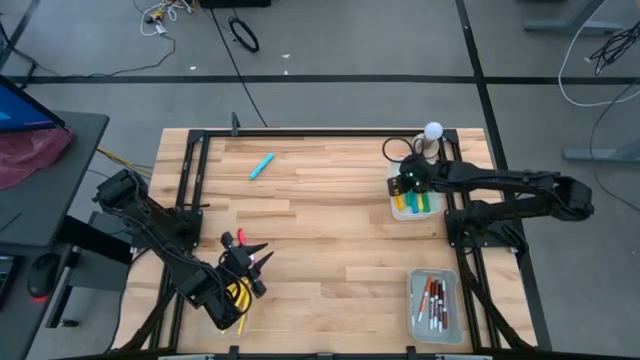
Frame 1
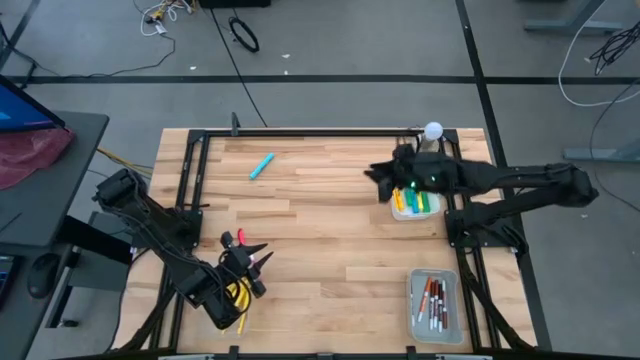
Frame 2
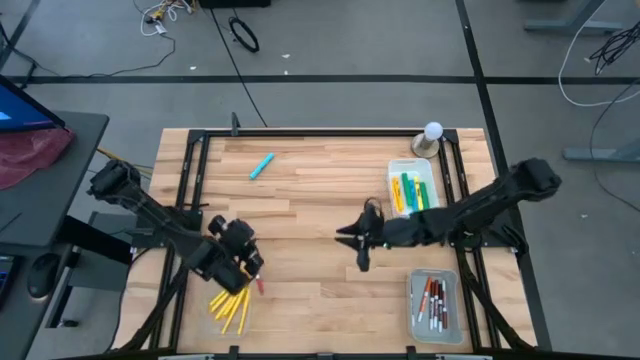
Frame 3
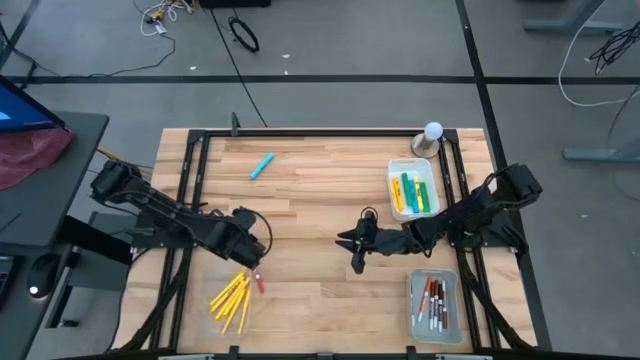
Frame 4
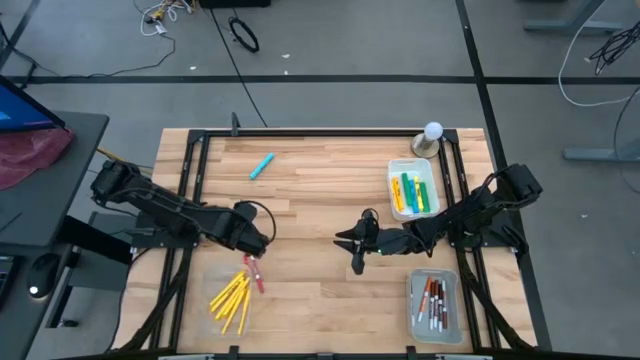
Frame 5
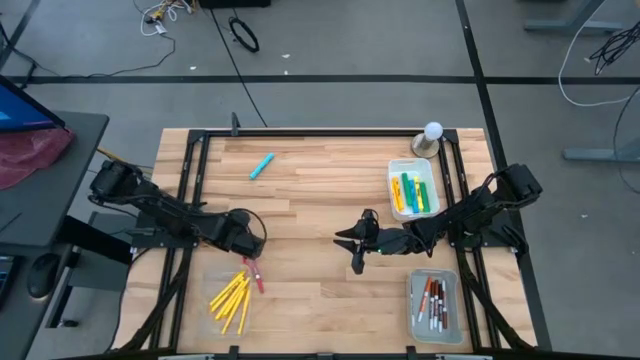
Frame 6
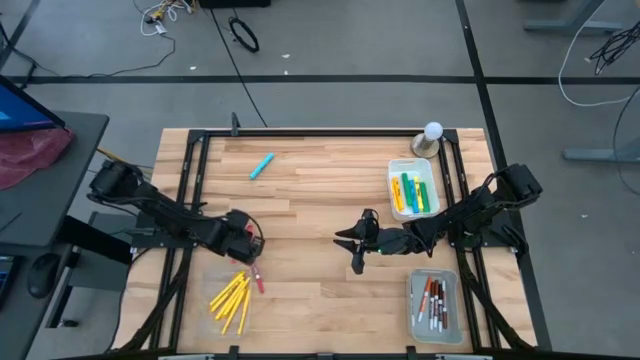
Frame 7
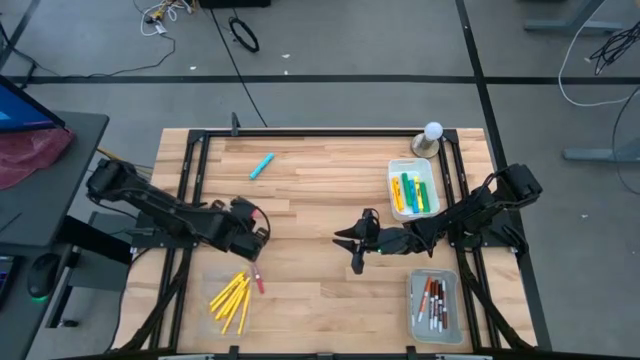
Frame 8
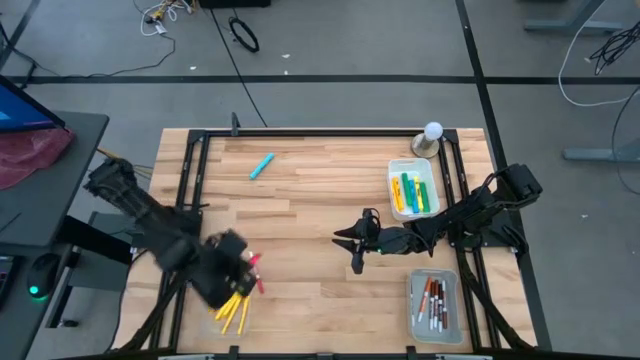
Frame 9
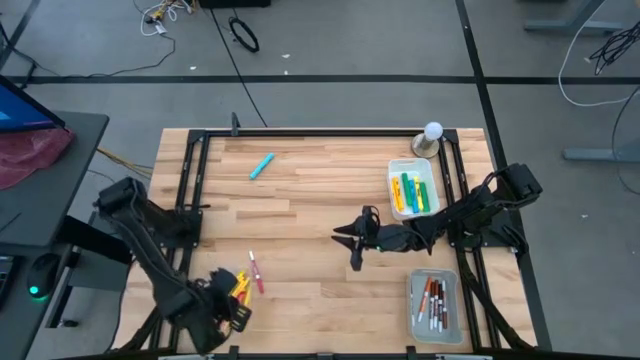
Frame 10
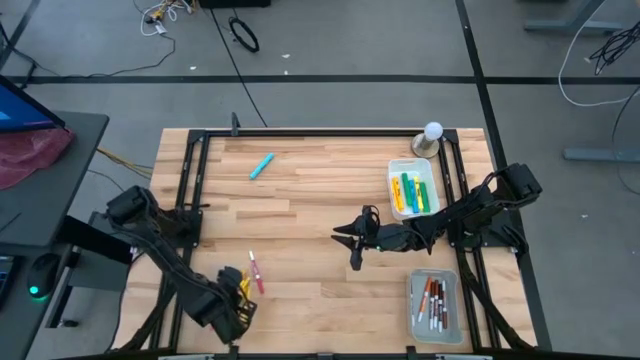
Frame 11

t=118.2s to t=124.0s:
Task: Pick & Place Markers
Put the pink pen into the transparent bin

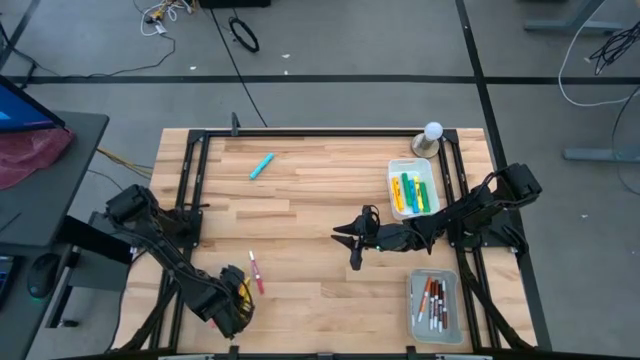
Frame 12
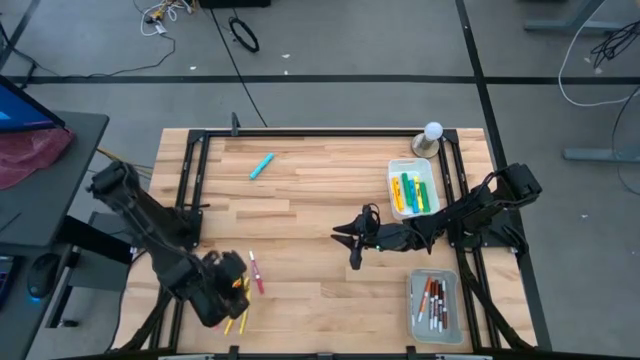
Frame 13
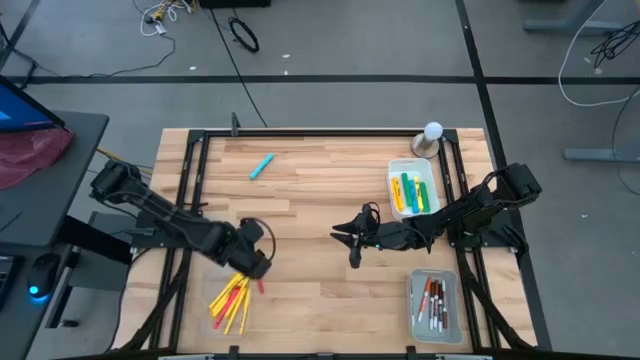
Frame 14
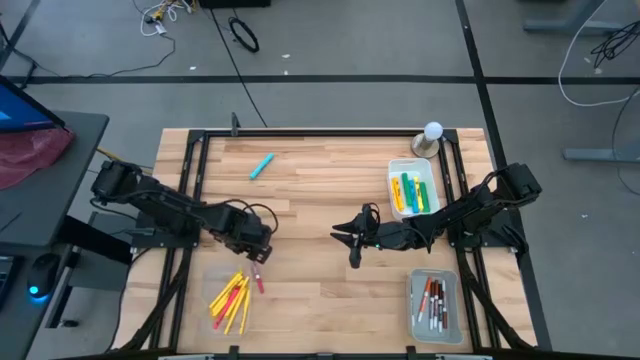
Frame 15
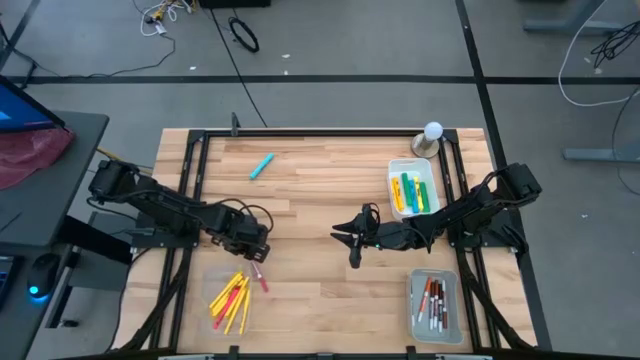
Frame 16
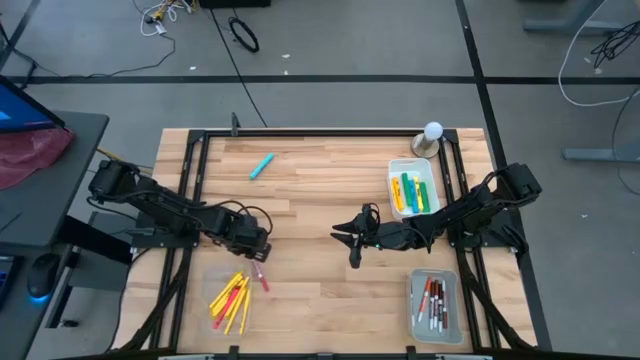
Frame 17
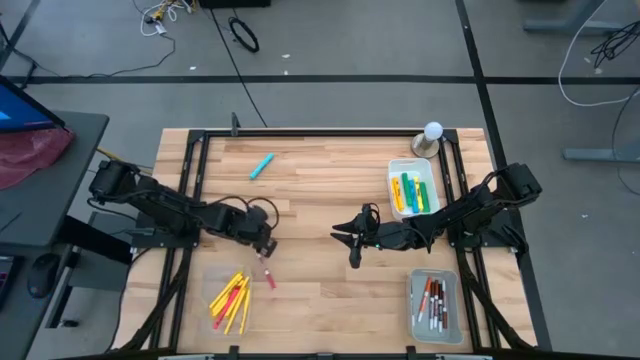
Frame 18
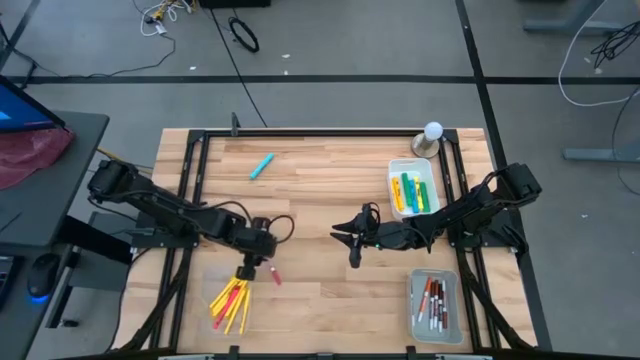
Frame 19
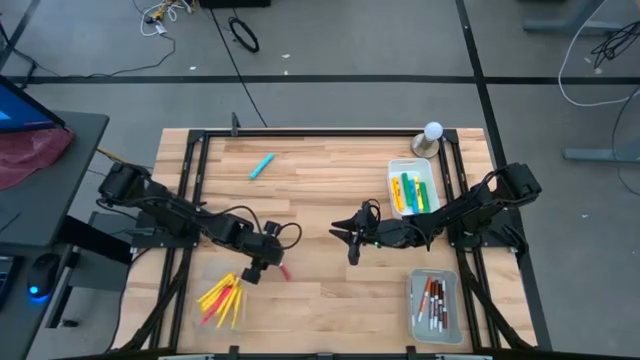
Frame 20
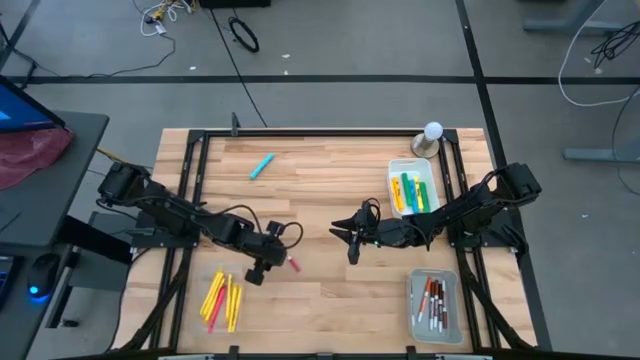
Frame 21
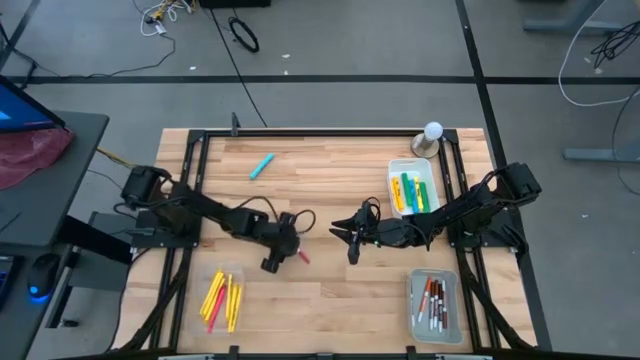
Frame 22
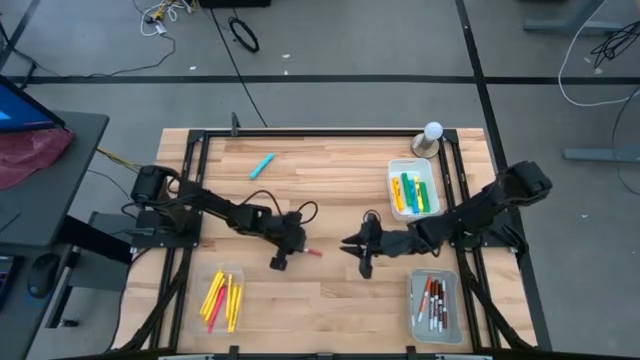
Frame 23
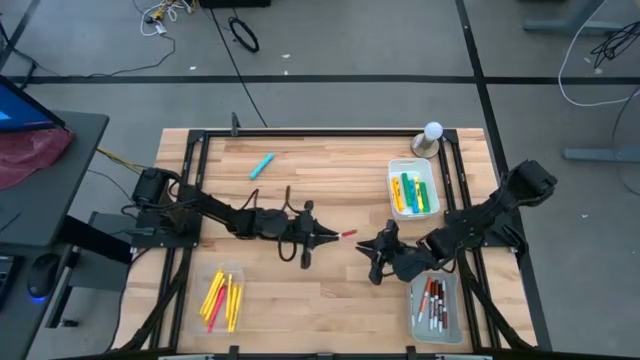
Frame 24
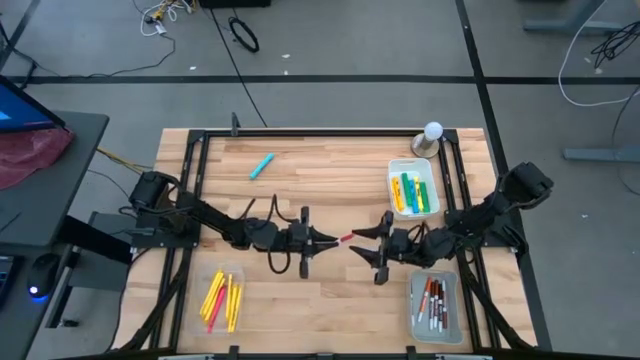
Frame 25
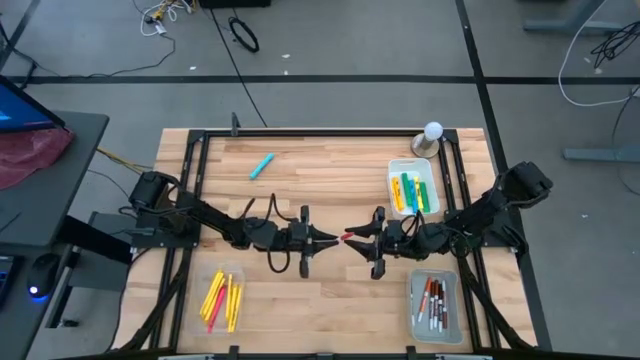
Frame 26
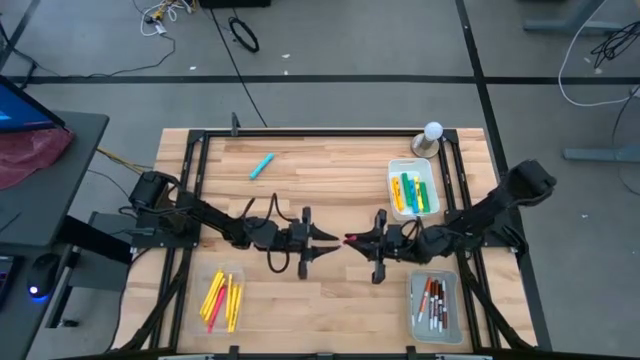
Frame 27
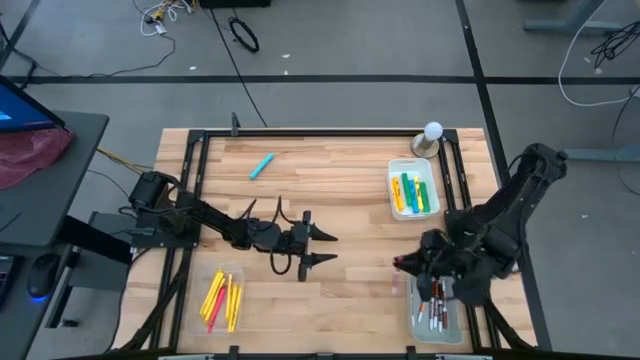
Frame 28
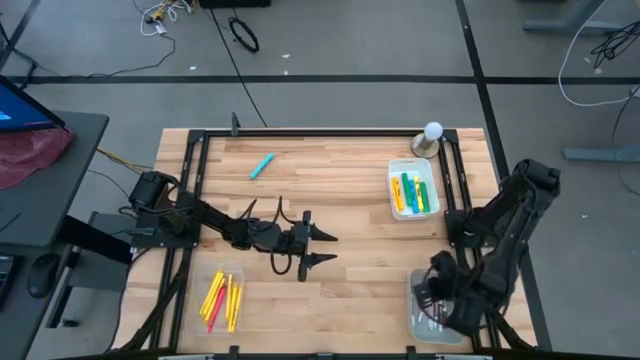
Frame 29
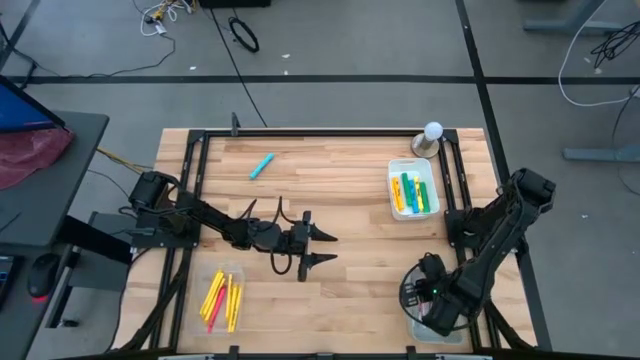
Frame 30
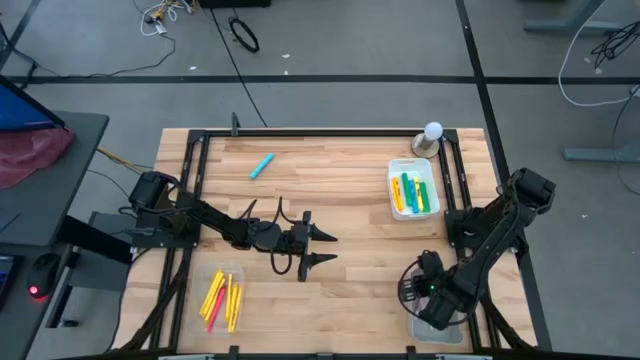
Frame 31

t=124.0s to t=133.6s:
Put the pink marker into the gray bin

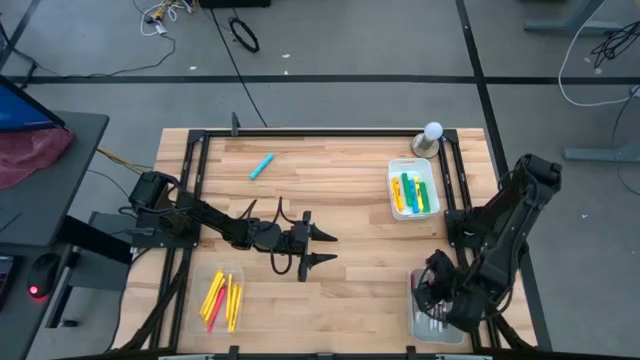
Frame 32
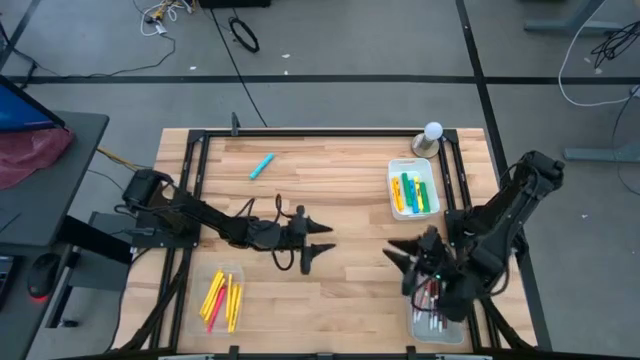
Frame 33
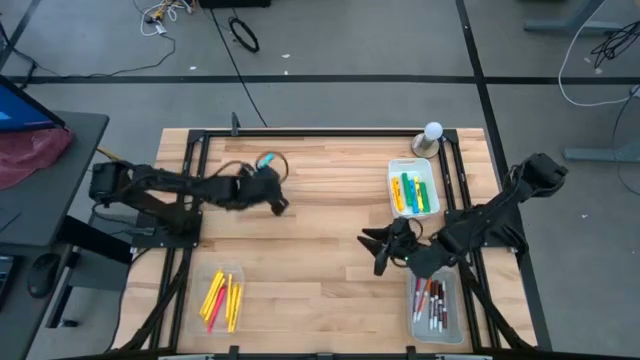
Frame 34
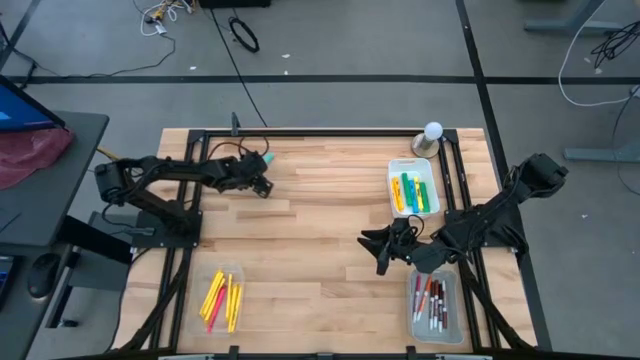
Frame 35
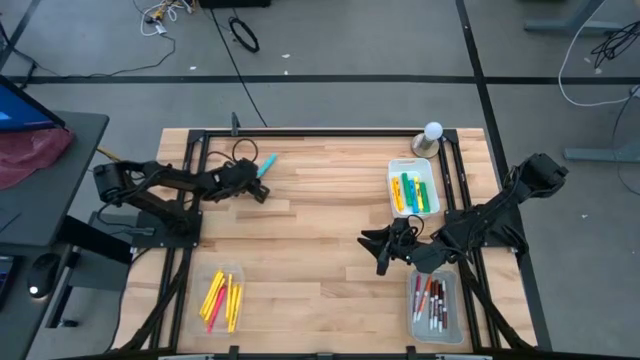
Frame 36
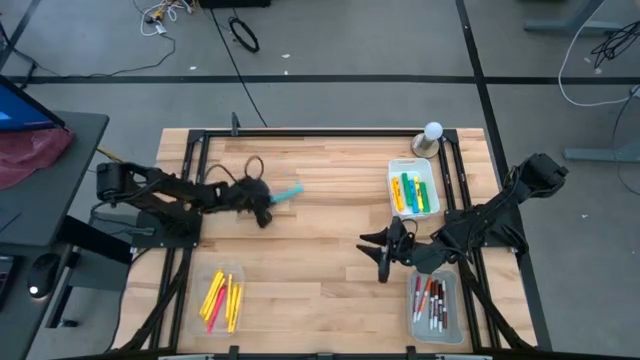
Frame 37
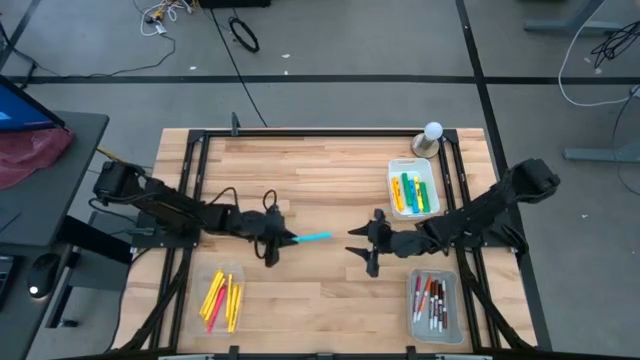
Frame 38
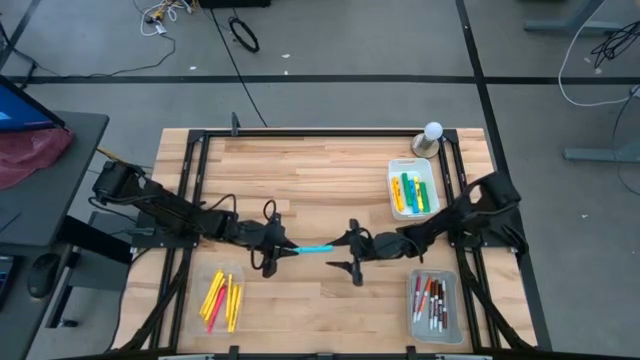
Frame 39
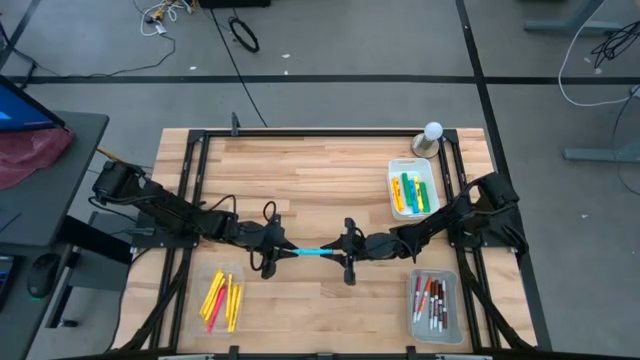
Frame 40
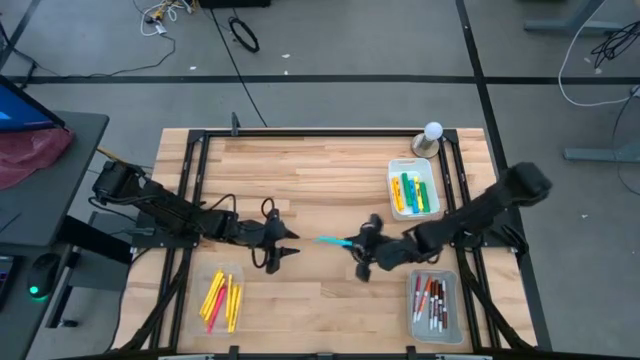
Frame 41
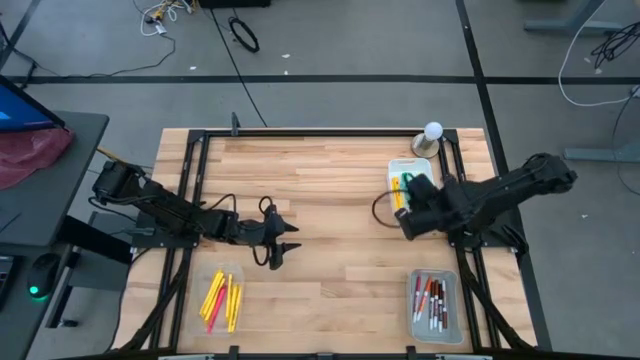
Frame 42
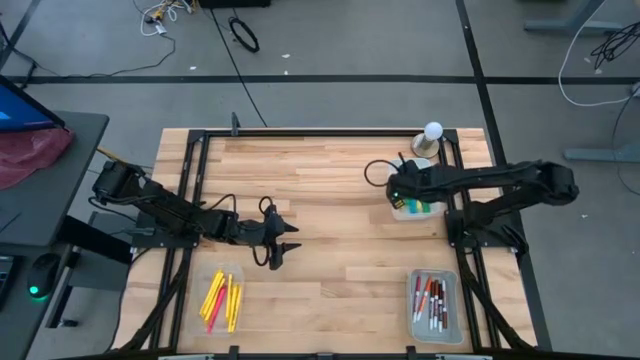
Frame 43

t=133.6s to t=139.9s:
Put the light blue highlighter into the white bin
